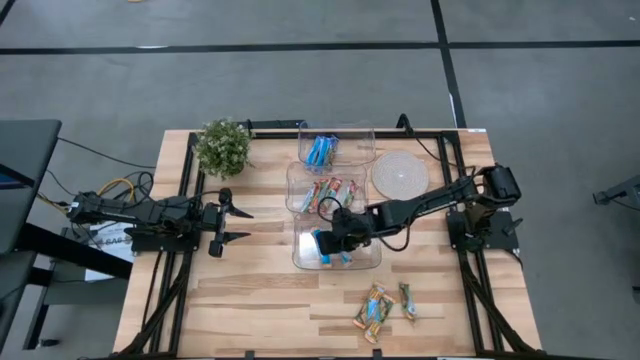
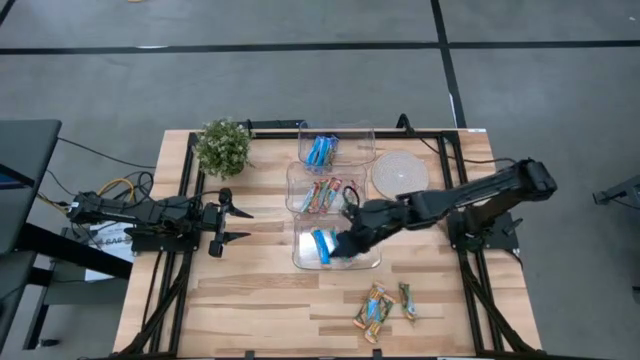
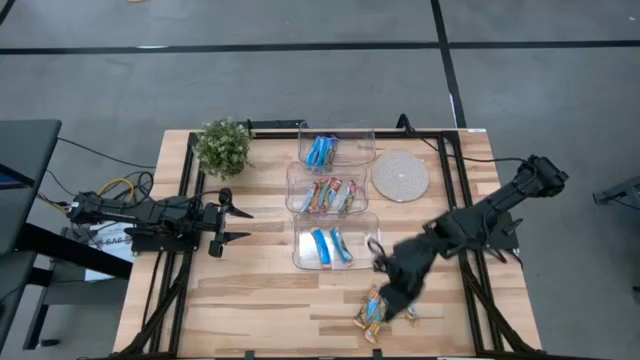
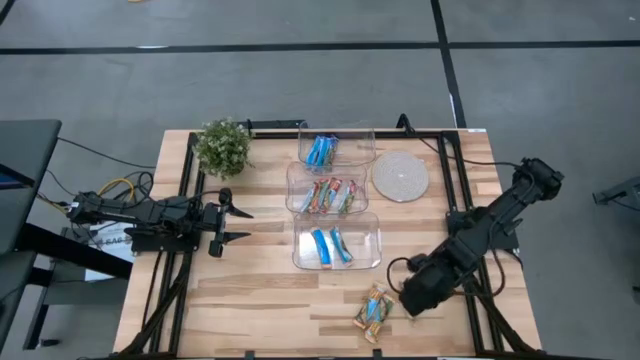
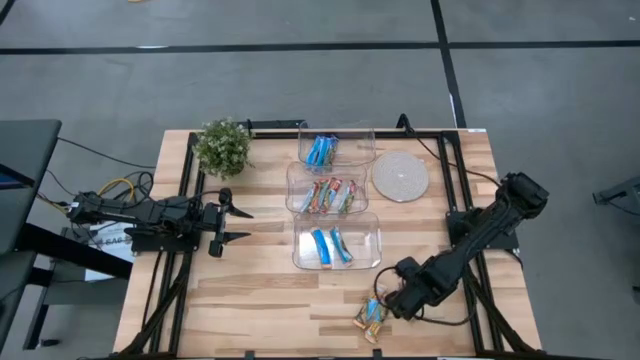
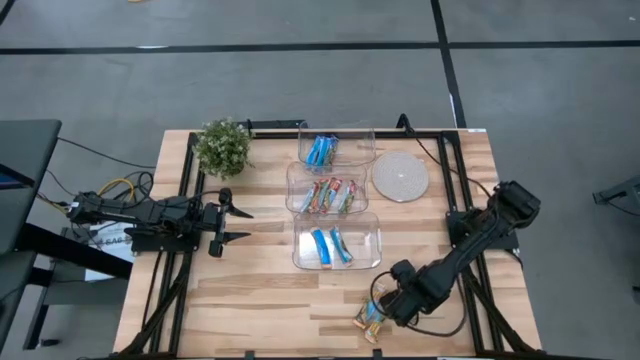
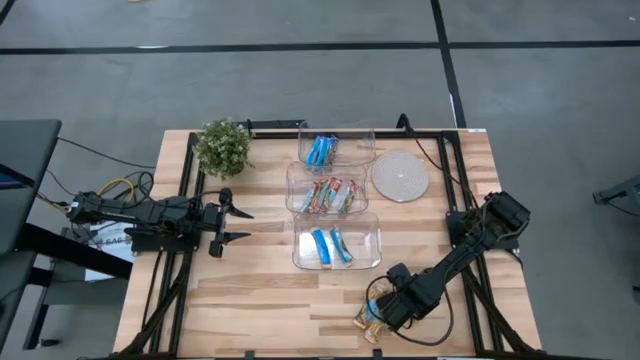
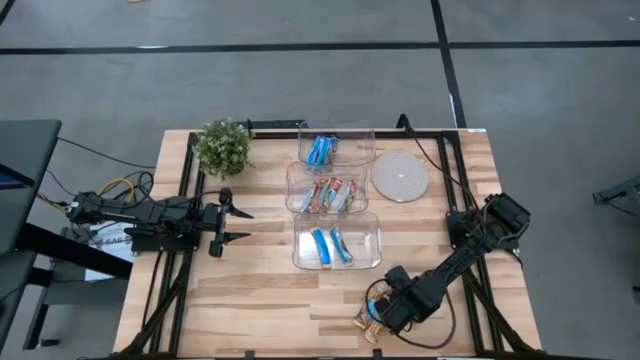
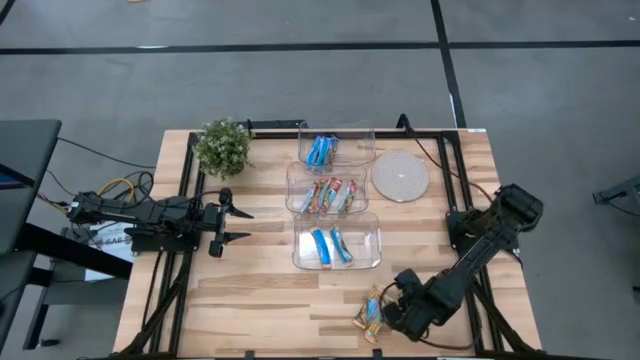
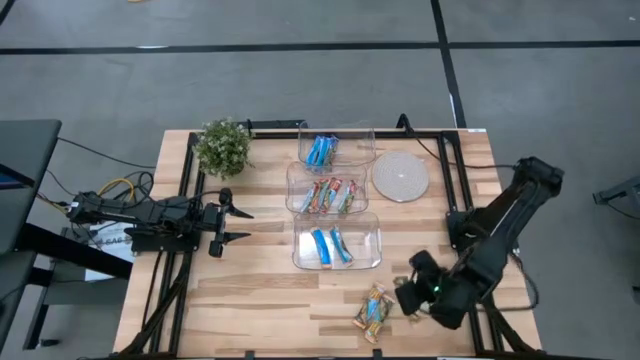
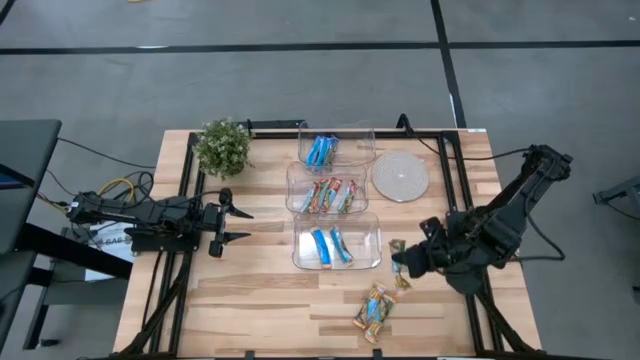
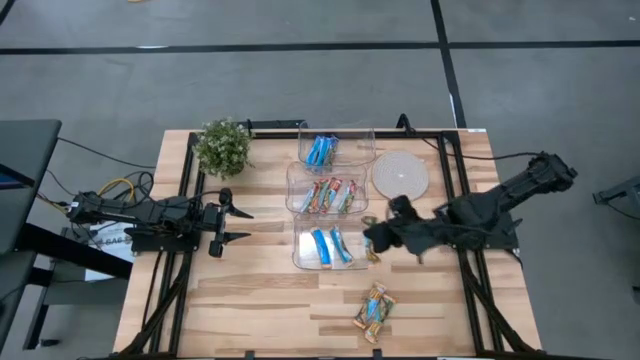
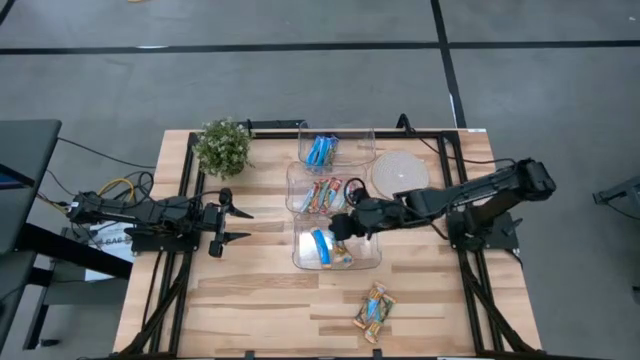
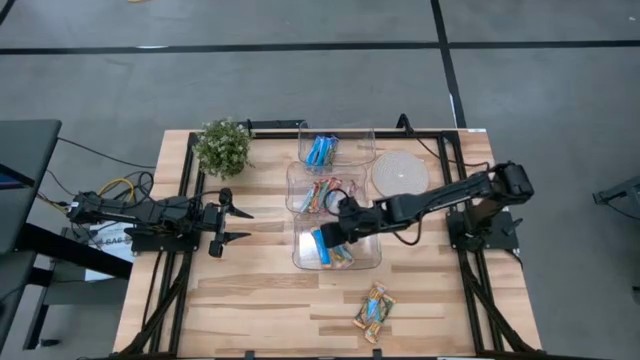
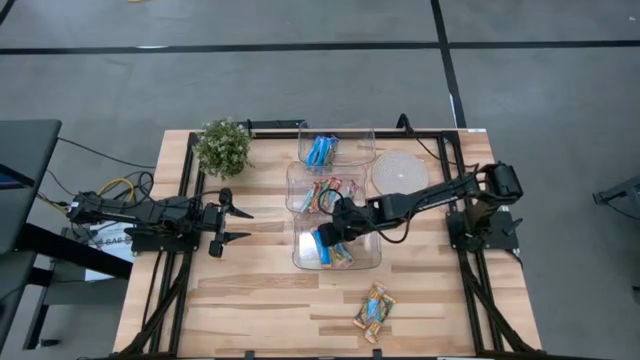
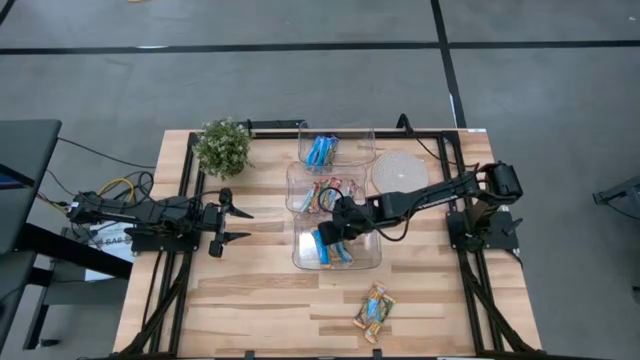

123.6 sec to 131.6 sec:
Task: Pick and place Granola Bars by type
Put the yellow granola bar into the bottom transparent bin

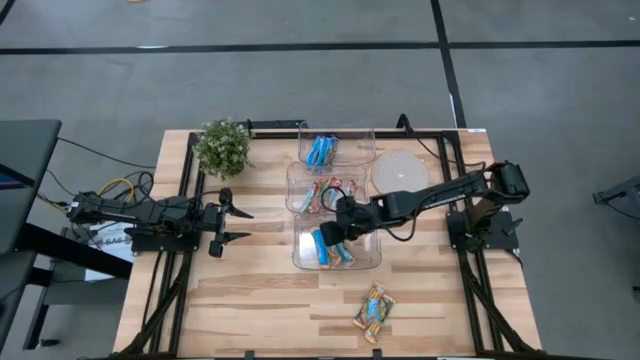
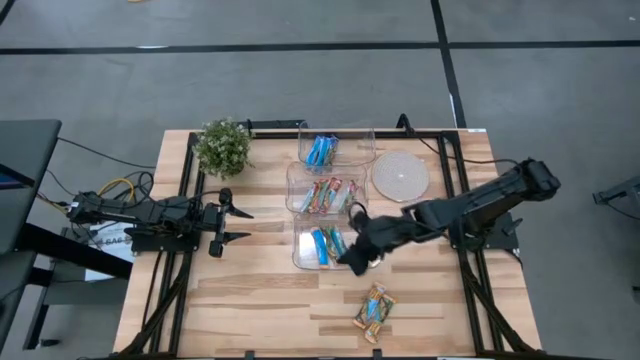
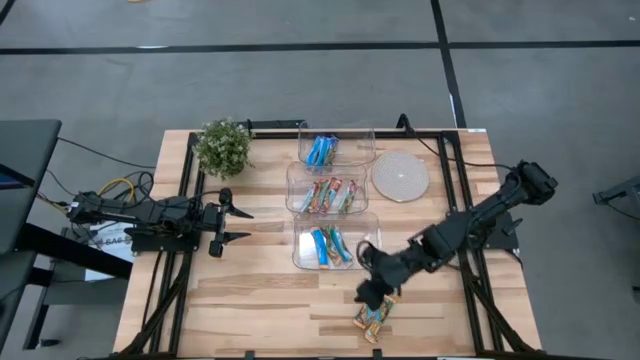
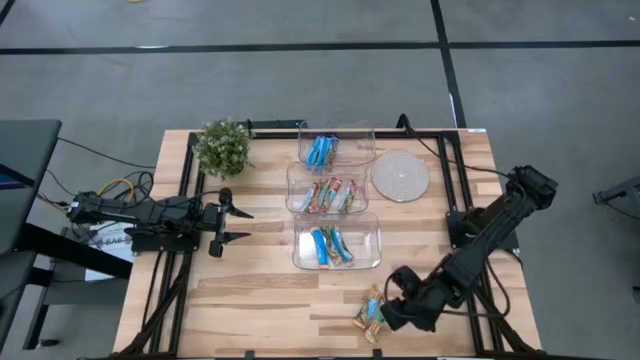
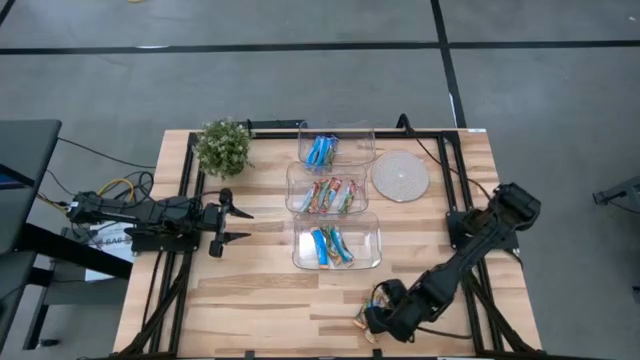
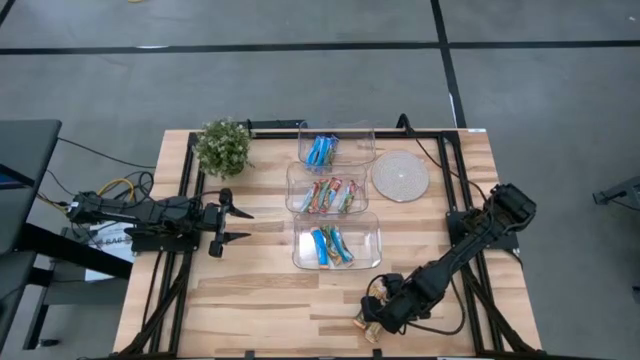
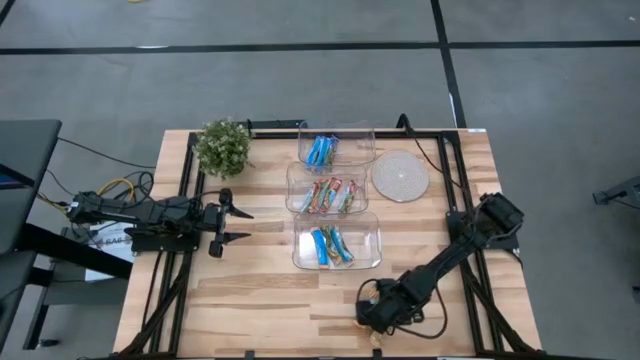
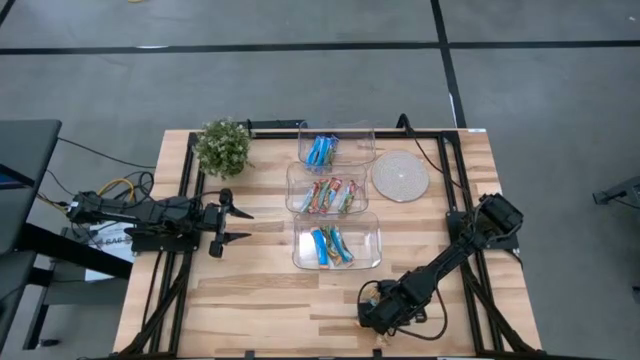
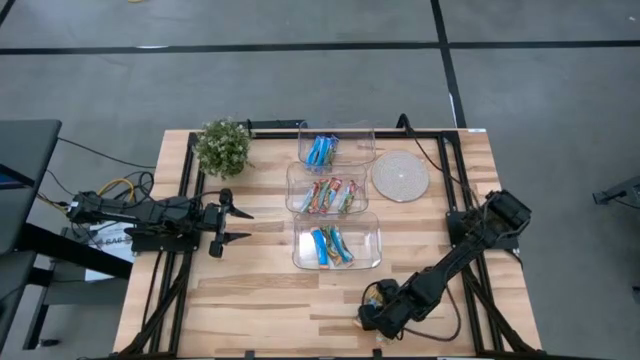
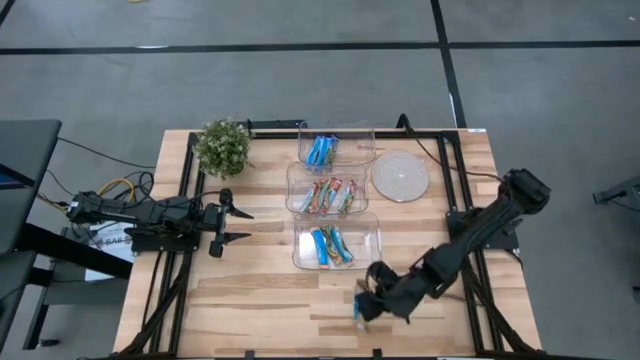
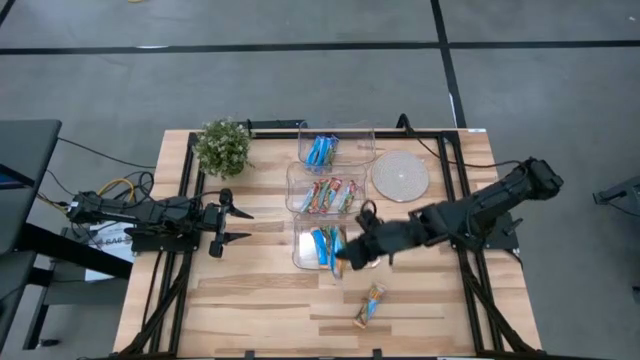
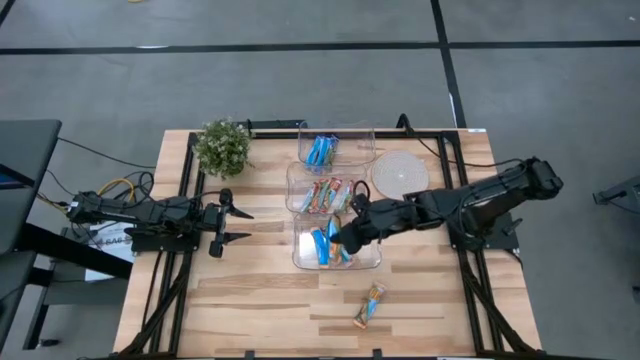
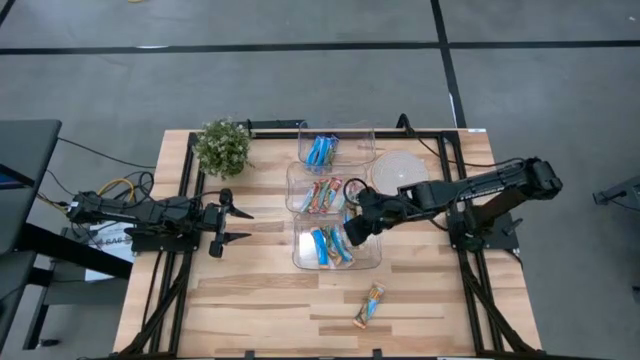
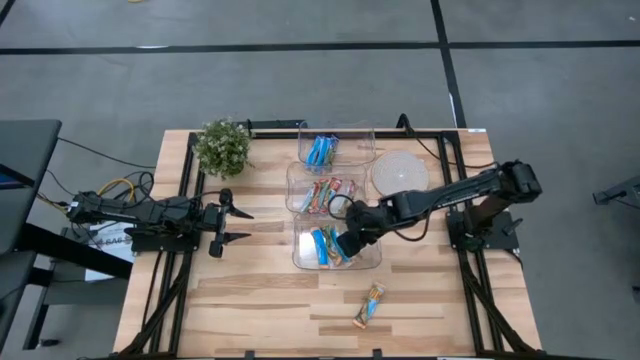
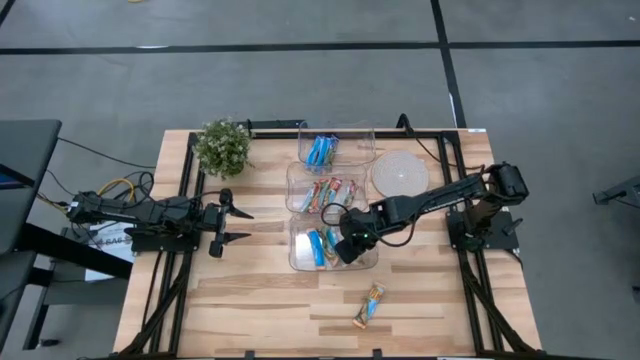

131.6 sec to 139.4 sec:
Put the yellow granola bar into the bottom transparent bin

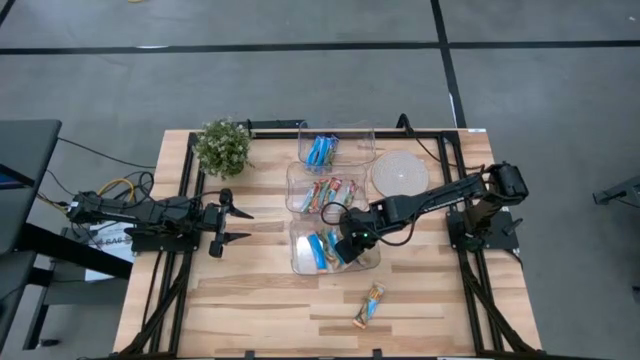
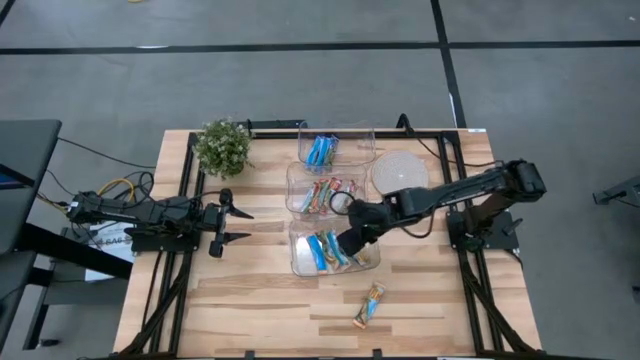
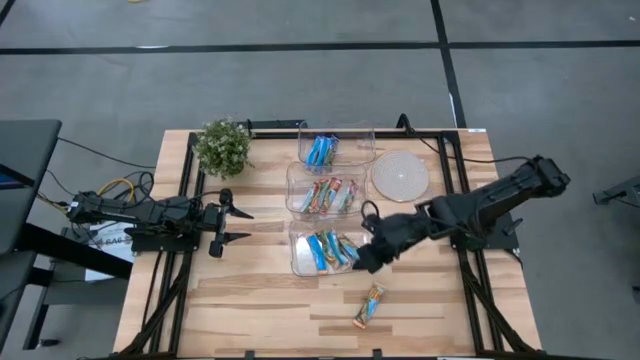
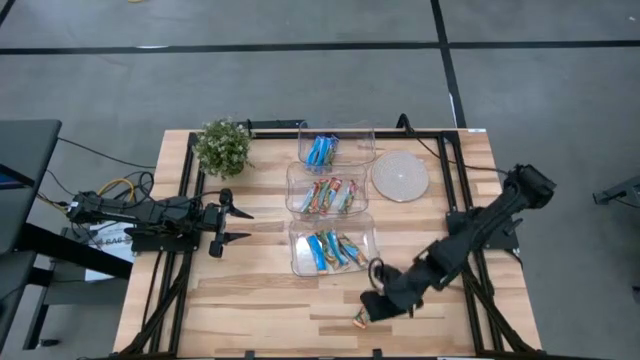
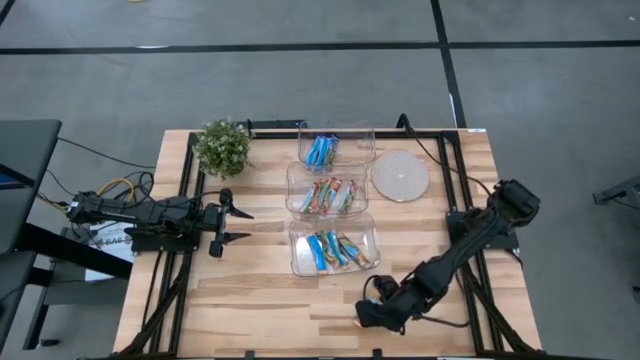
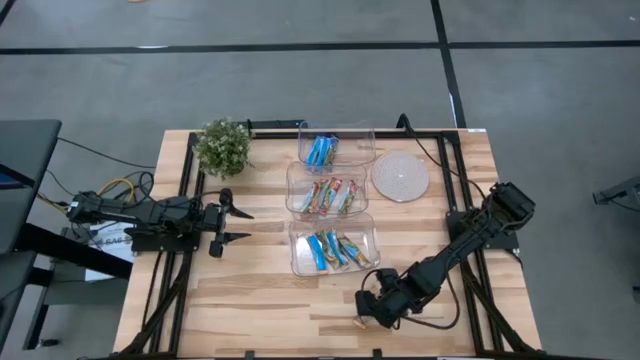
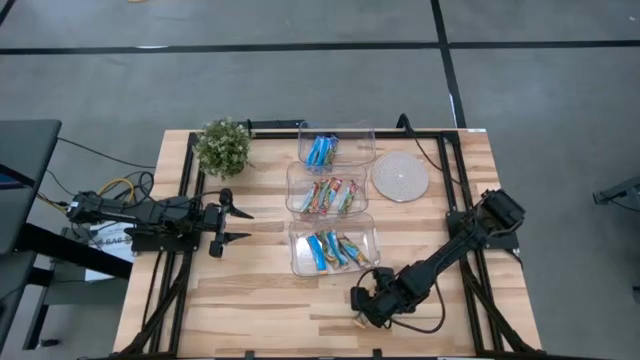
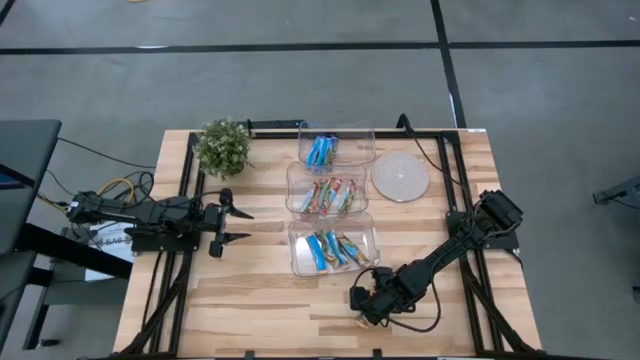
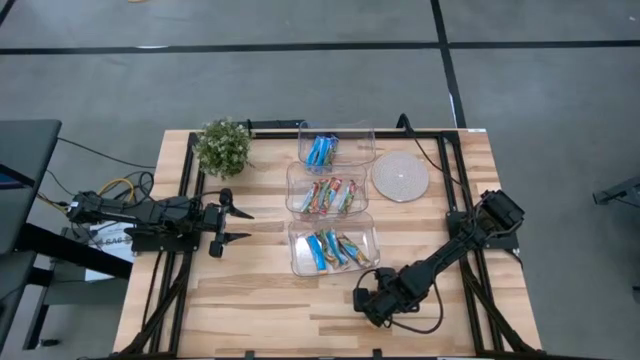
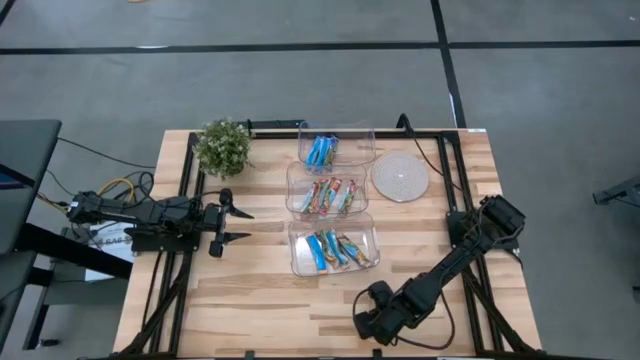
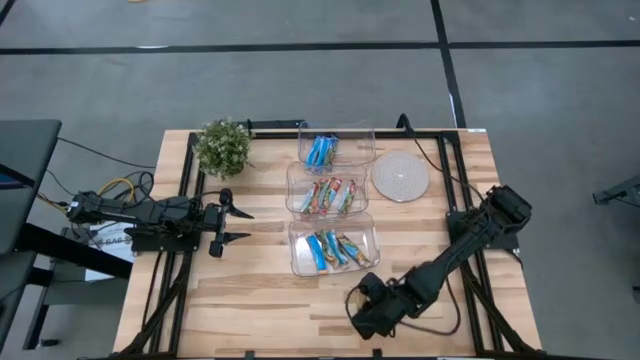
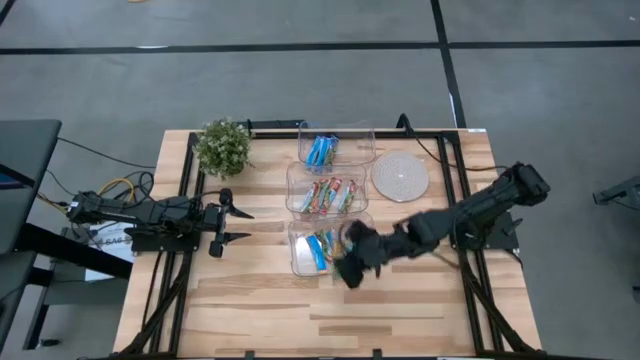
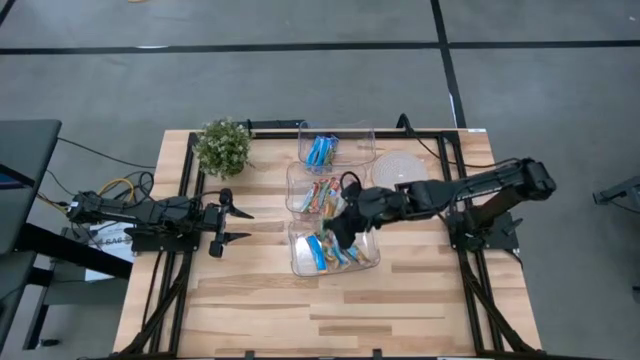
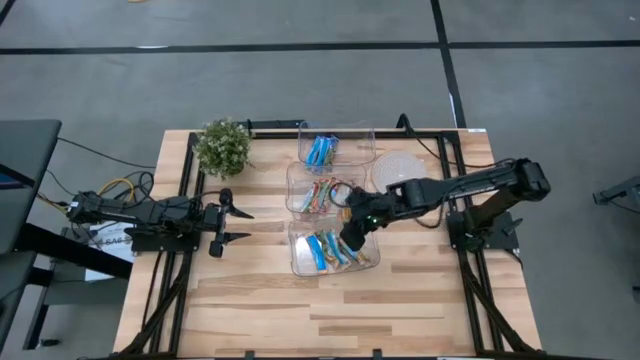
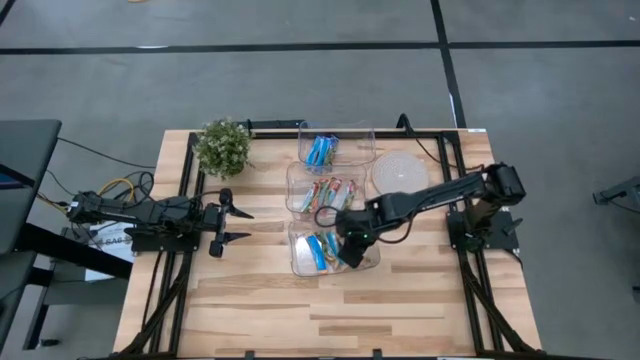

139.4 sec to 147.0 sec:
Put the yellow granola bar into the bottom transparent bin
